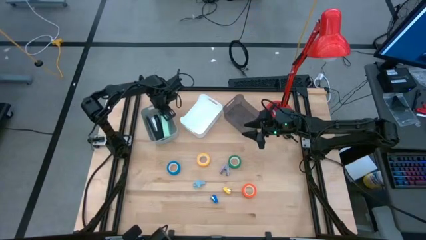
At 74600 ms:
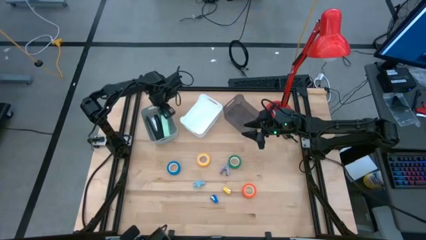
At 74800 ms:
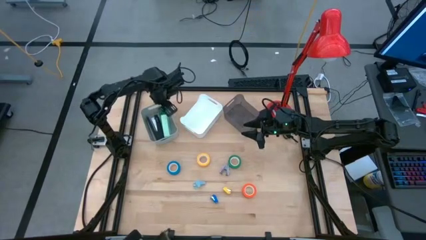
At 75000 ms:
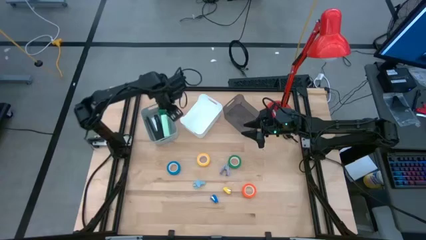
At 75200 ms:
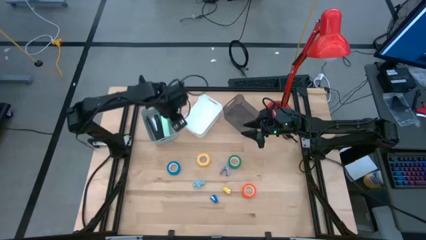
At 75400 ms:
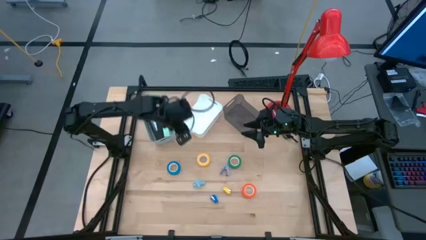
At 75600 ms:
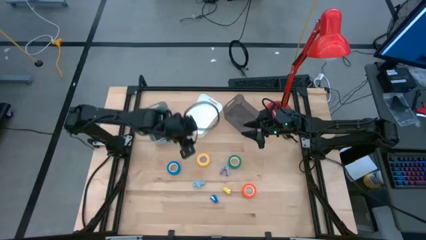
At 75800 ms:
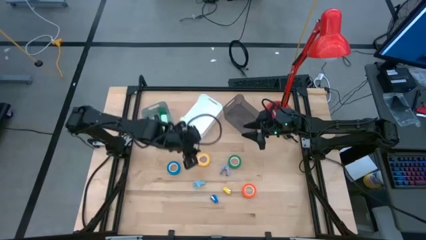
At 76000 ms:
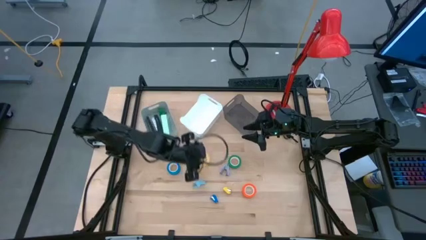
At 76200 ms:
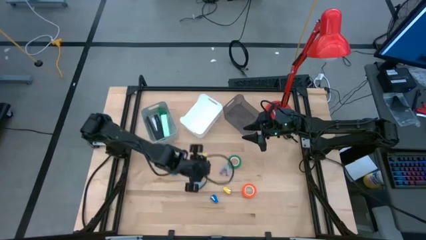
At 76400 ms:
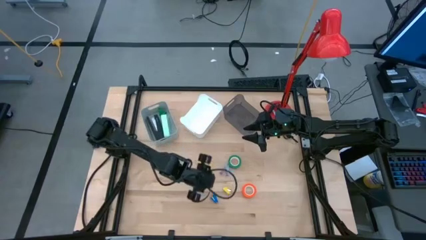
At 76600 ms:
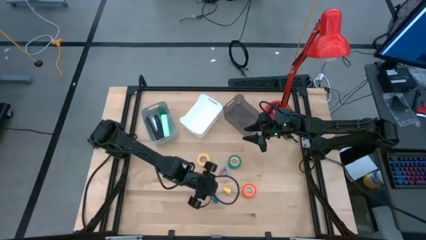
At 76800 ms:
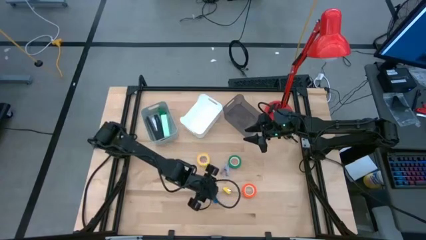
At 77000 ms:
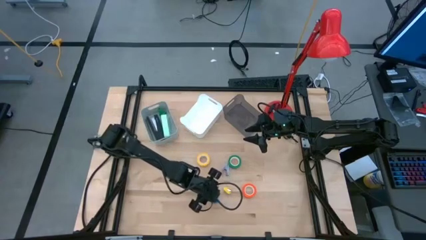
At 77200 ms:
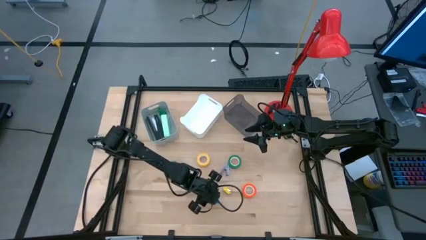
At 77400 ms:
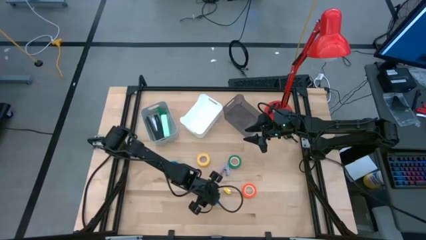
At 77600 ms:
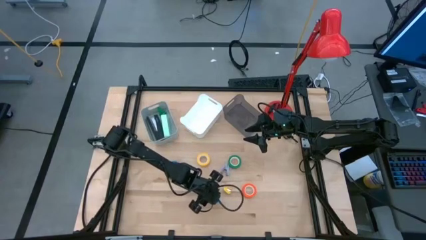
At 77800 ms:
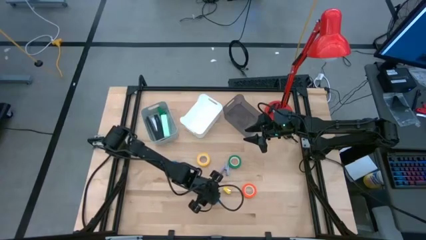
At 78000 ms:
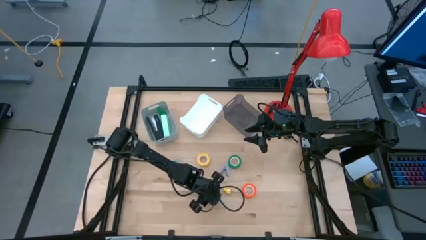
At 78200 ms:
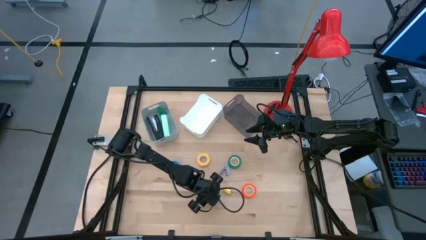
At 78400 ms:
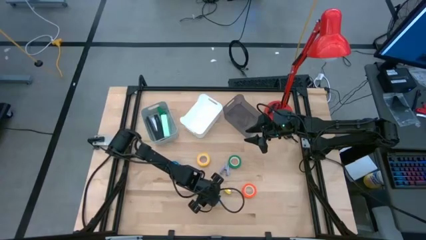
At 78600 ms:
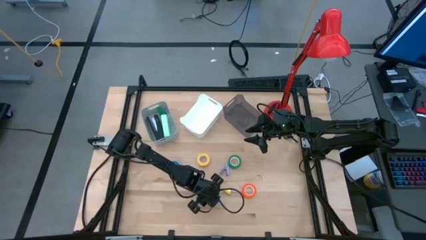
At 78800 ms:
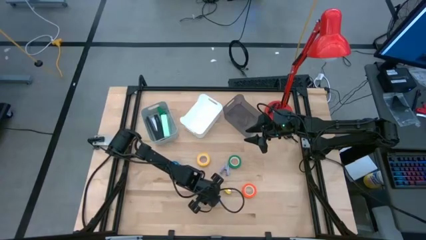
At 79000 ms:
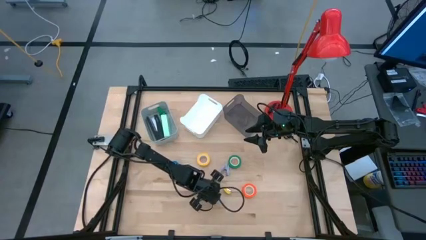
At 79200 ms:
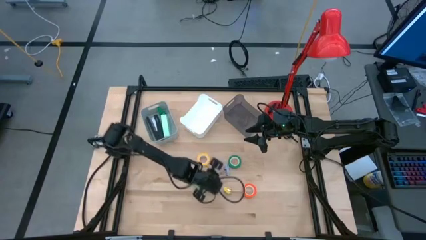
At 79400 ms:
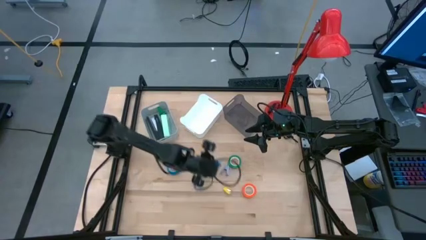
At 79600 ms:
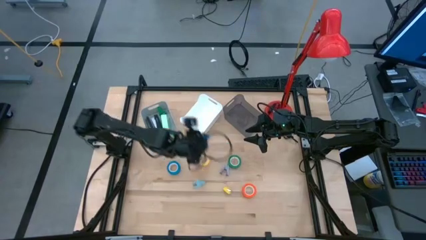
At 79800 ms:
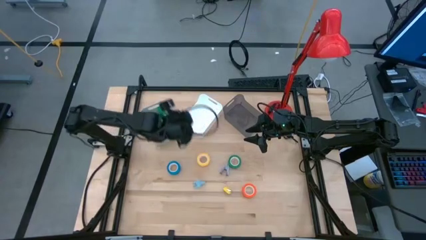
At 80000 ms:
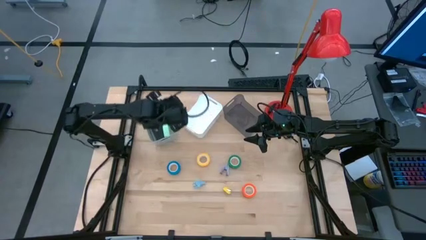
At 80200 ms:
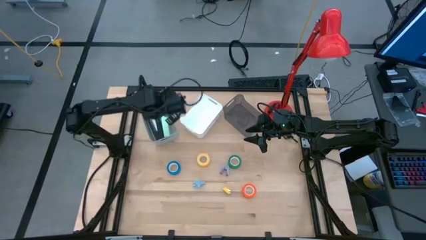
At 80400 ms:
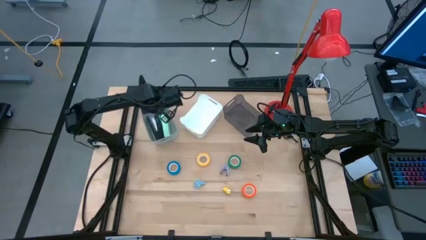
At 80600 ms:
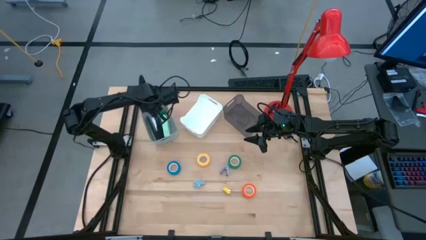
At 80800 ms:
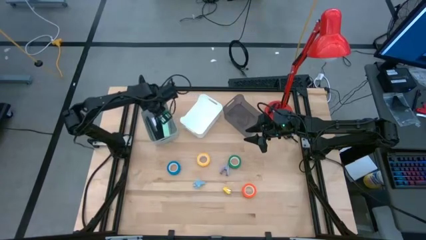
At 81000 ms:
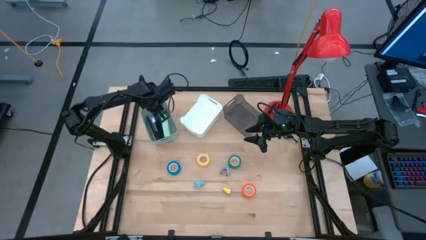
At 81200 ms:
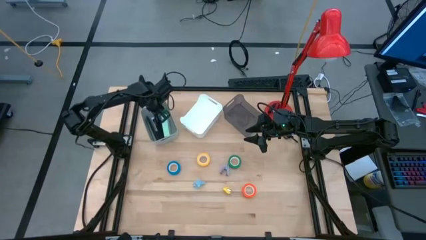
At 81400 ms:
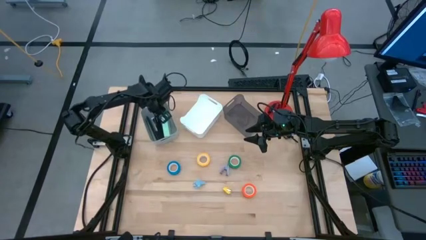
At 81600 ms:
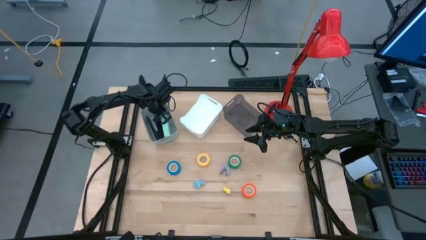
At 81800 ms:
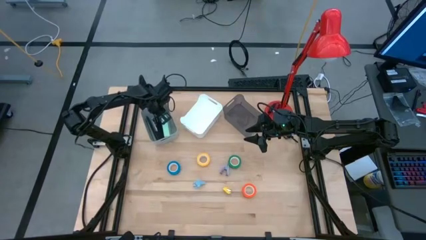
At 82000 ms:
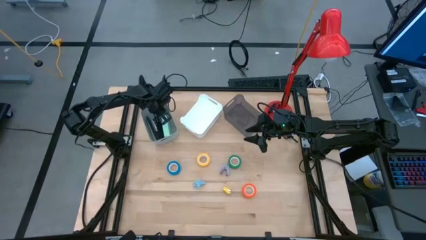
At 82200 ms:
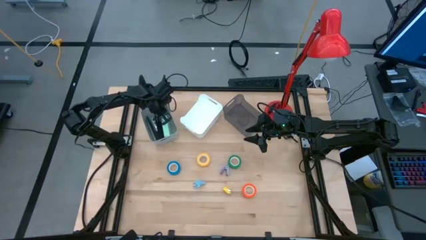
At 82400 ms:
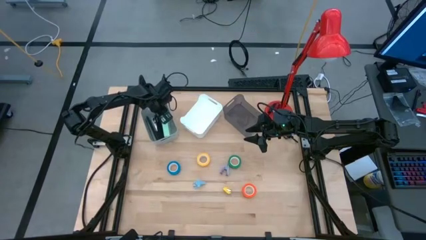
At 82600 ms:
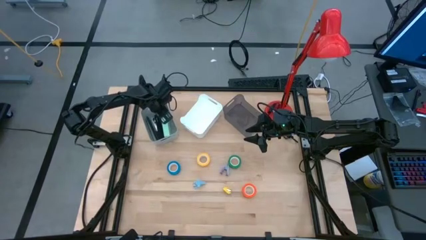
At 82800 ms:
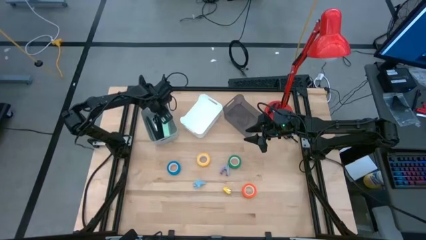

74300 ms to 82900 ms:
Task: Pick and place Stapler, Stapler remover, tape
Put the small blue stapler into the gray bin

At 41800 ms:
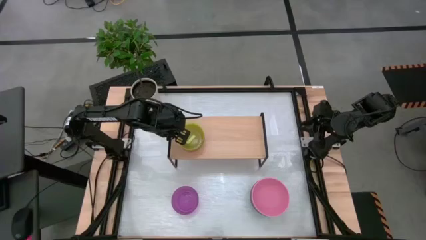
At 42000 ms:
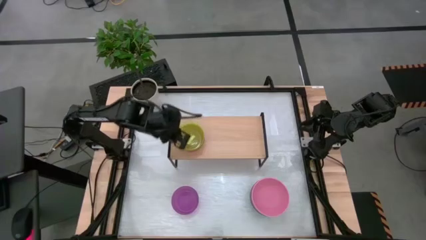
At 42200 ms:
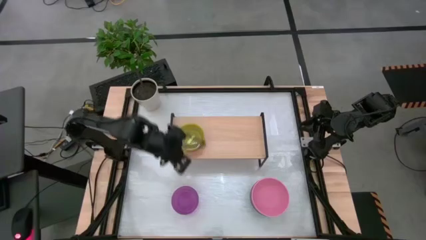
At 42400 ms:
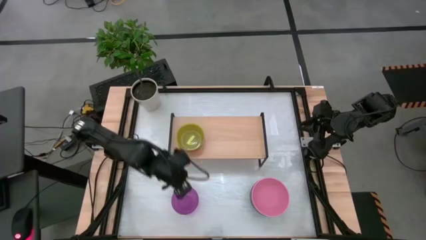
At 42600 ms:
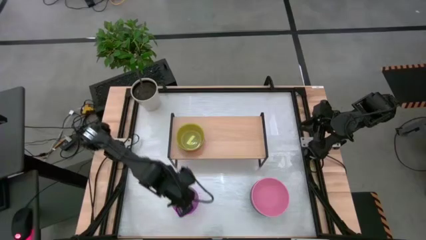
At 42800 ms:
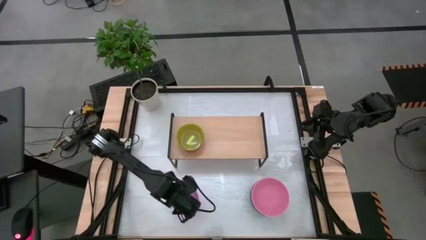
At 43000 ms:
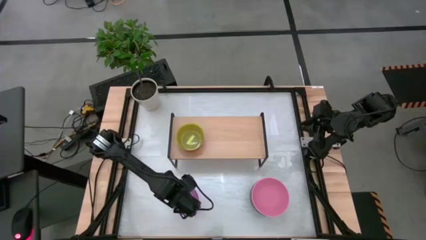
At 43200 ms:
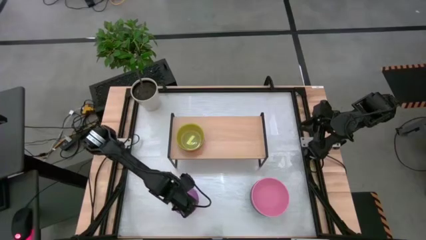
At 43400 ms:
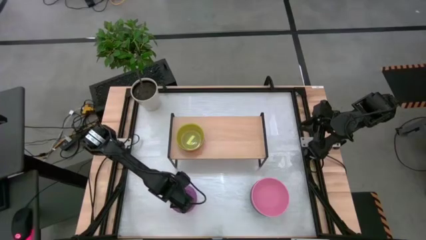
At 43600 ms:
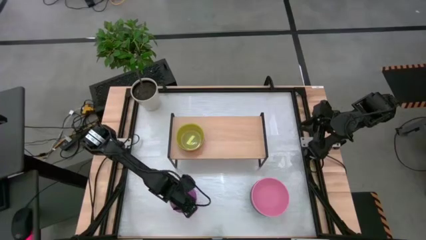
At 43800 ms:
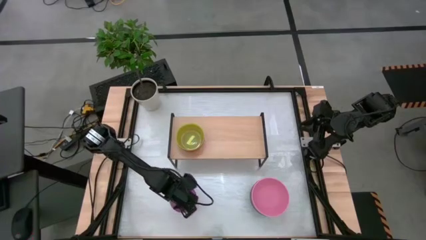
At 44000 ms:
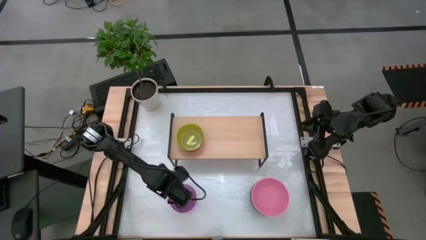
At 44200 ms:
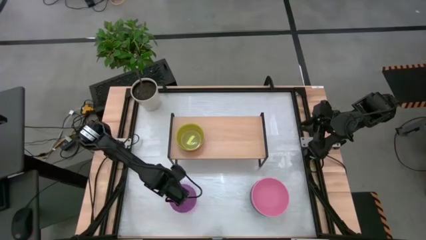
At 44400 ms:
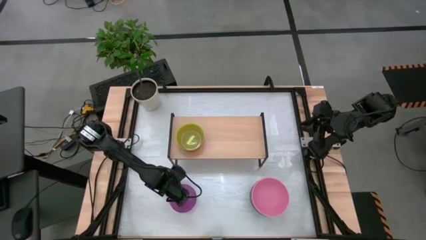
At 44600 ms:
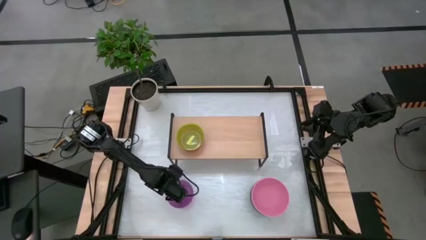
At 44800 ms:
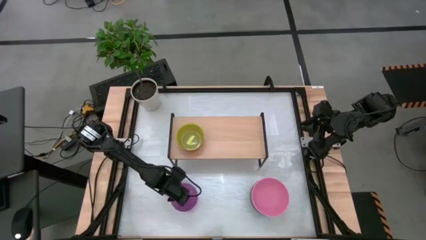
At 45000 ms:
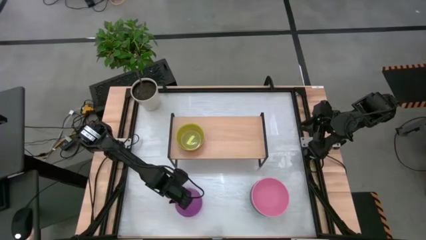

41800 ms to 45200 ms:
Task: Place and stack bowls onto a shelf
Stack the small purple bowl on top of the yellow bowl on the shelf

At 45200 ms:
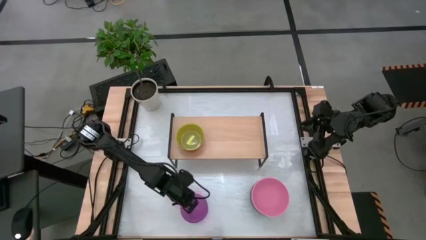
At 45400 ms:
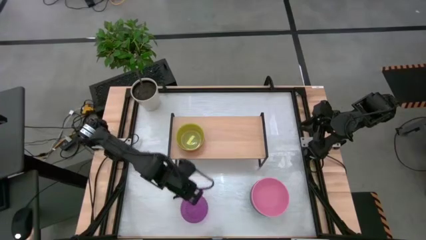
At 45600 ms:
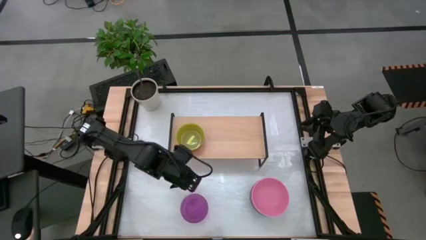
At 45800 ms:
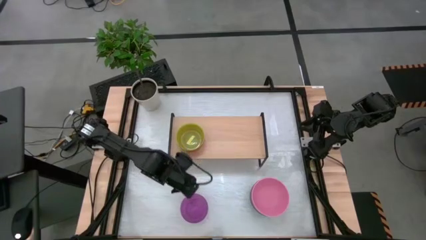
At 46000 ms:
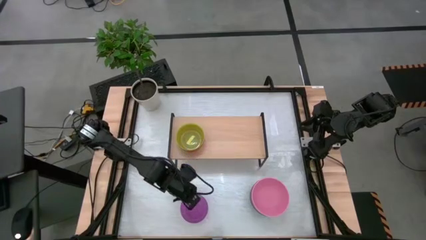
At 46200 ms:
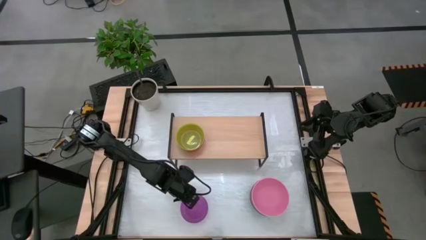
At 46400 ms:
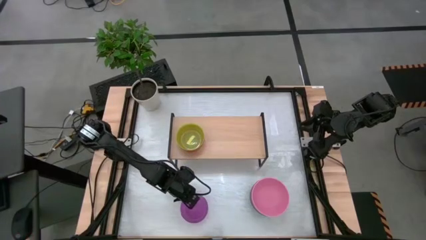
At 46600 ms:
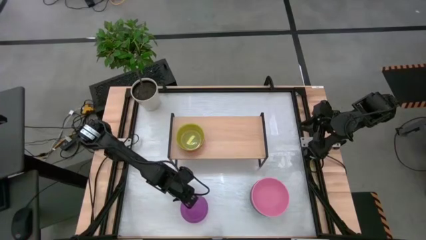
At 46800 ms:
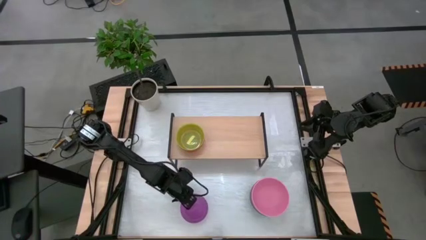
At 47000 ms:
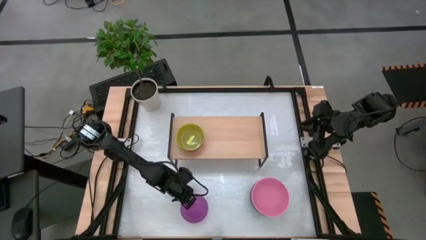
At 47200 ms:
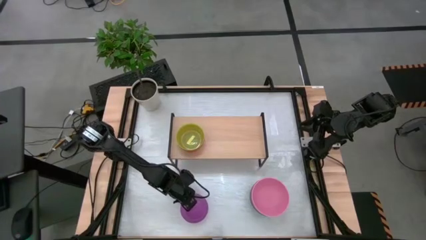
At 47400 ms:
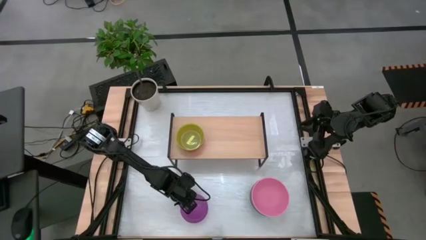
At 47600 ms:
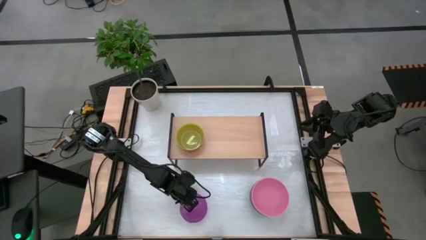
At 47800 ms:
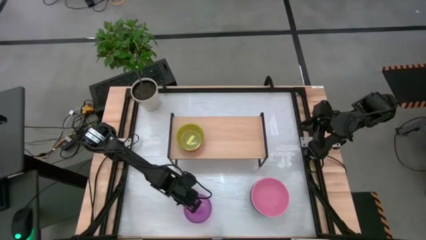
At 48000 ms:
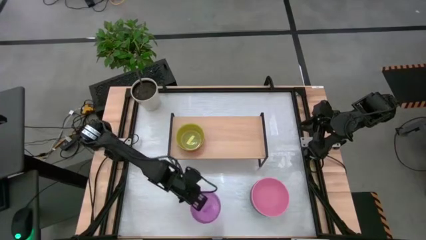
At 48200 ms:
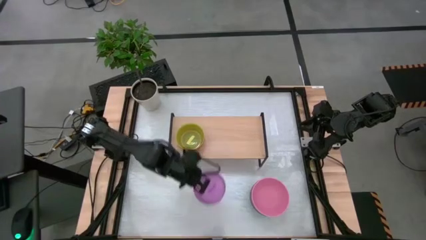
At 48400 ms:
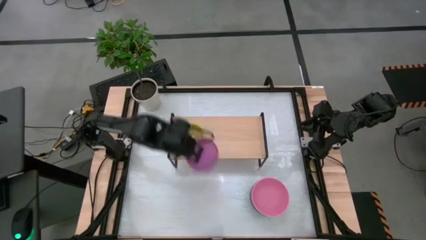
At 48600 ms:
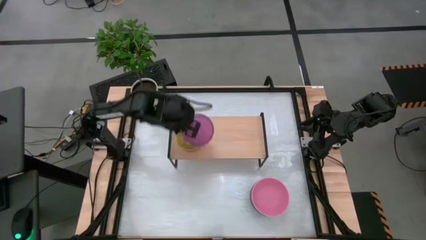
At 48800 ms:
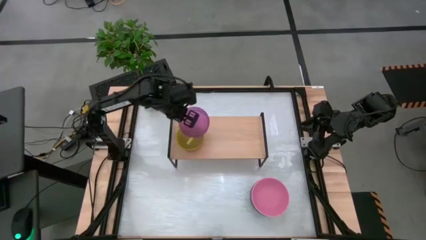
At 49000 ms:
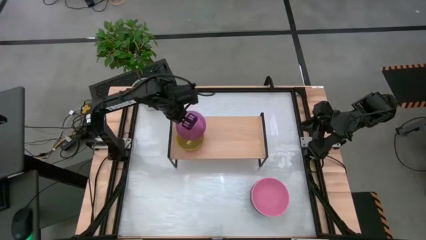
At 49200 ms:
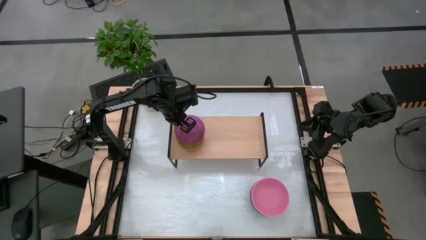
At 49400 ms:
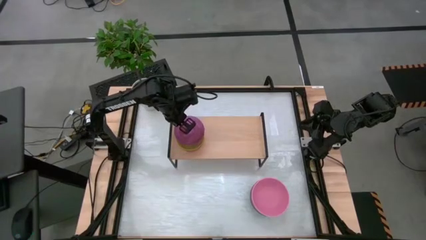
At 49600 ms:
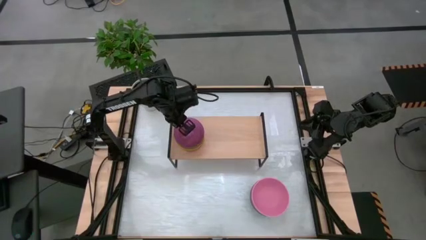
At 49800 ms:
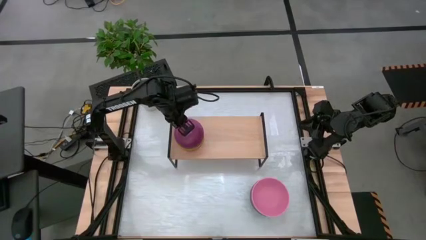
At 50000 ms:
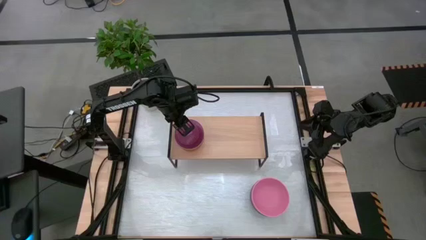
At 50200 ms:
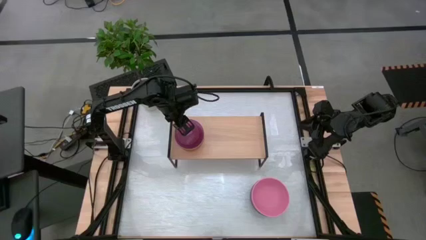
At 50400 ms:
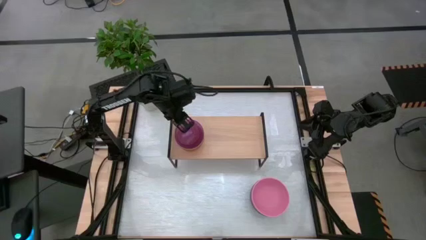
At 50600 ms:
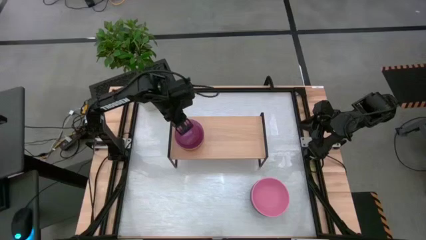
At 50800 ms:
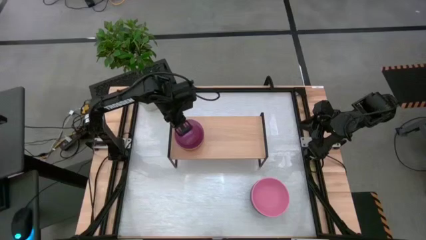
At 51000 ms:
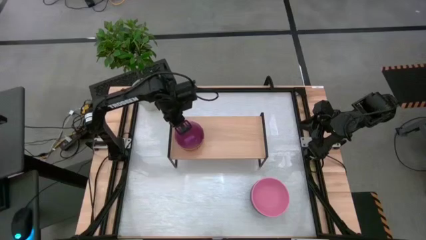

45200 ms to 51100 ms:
Stack the small purple bowl on top of the yellow bowl on the shelf
